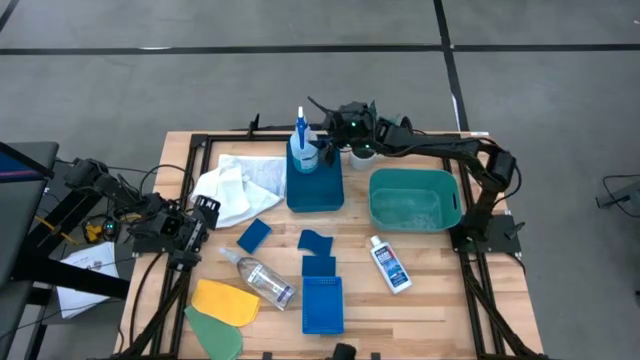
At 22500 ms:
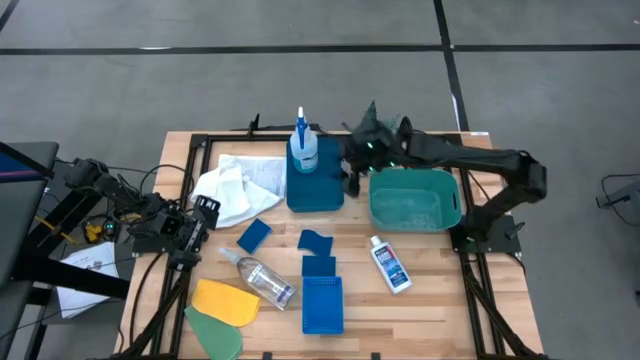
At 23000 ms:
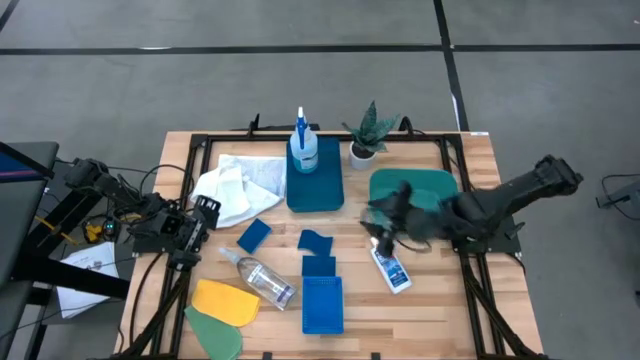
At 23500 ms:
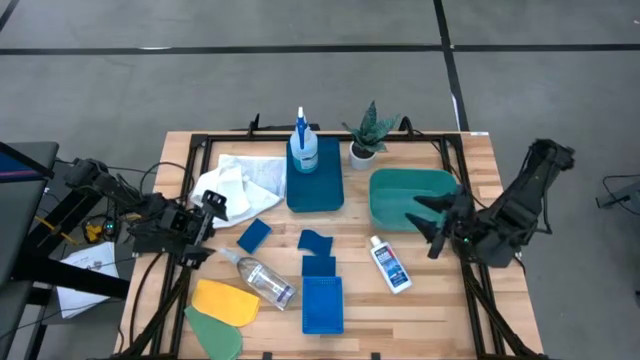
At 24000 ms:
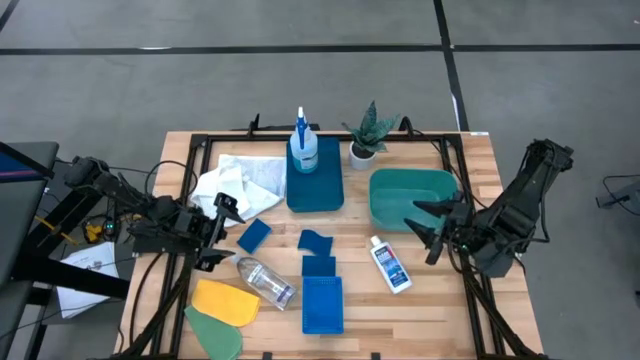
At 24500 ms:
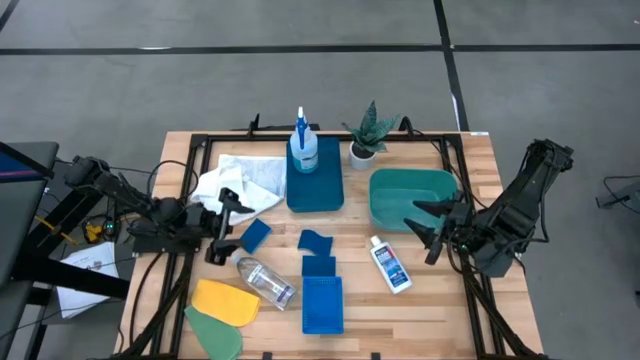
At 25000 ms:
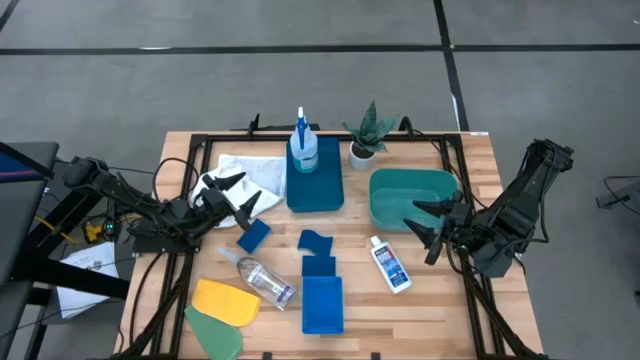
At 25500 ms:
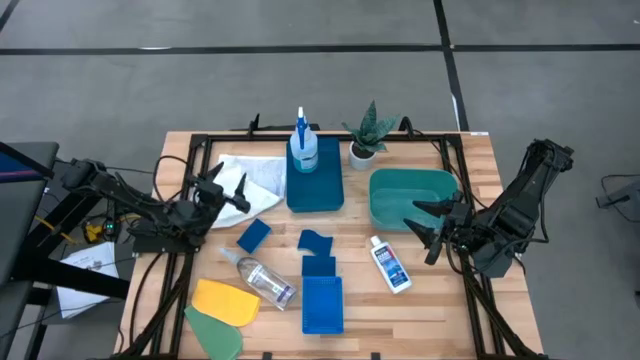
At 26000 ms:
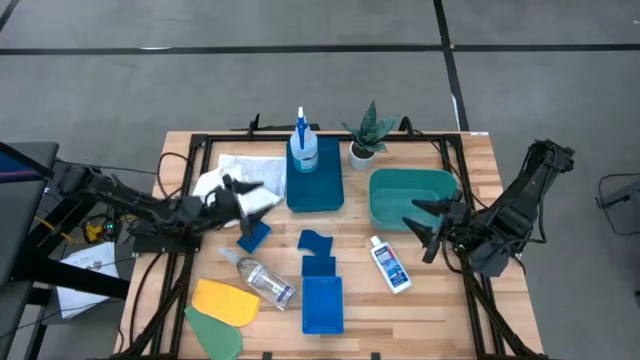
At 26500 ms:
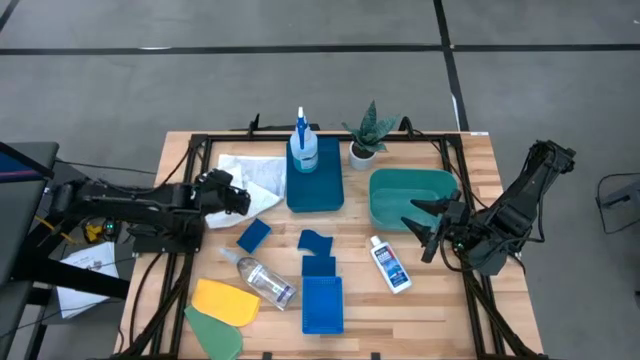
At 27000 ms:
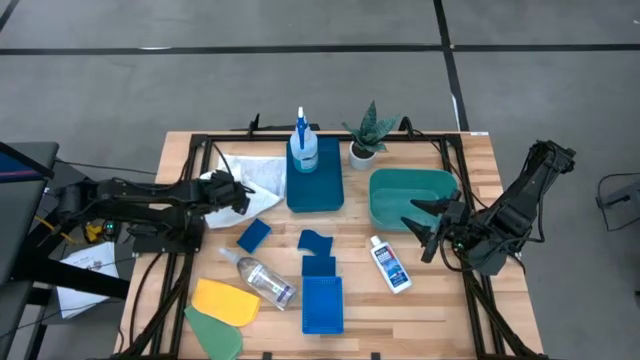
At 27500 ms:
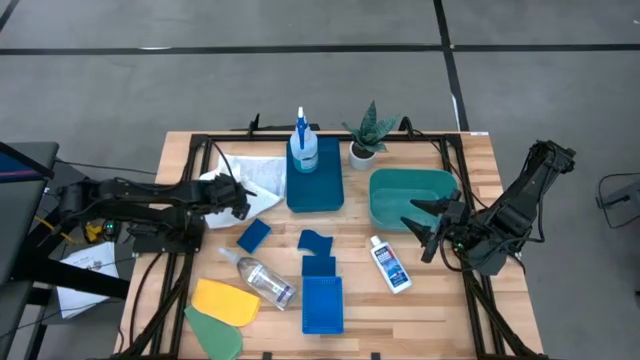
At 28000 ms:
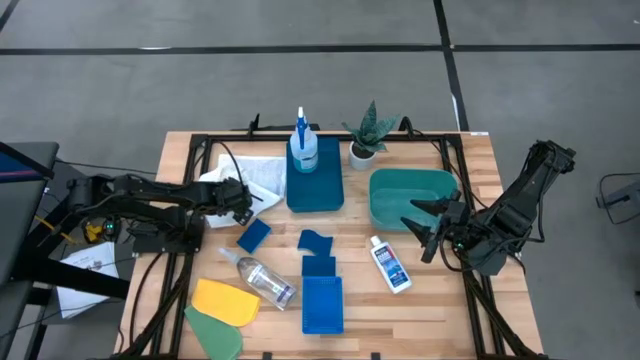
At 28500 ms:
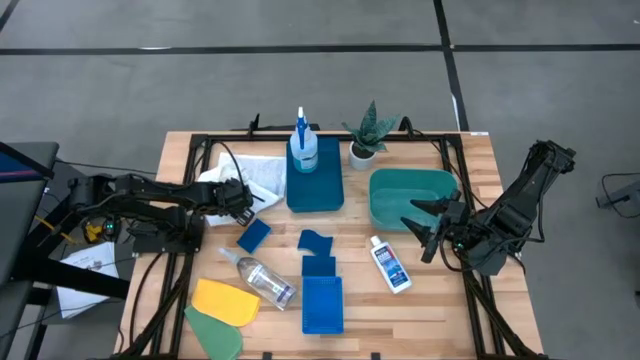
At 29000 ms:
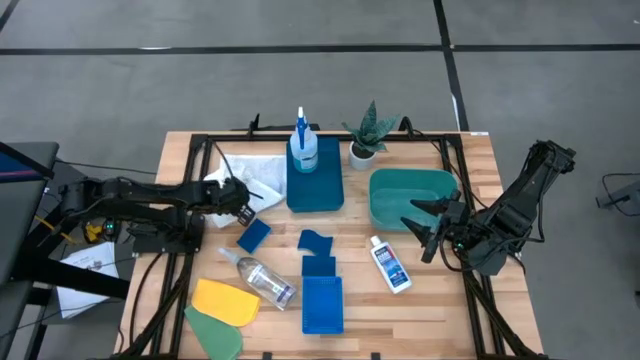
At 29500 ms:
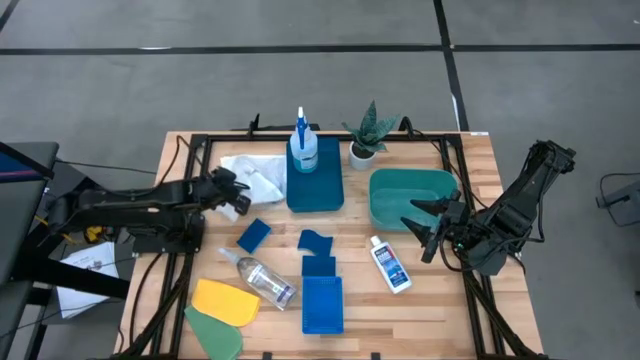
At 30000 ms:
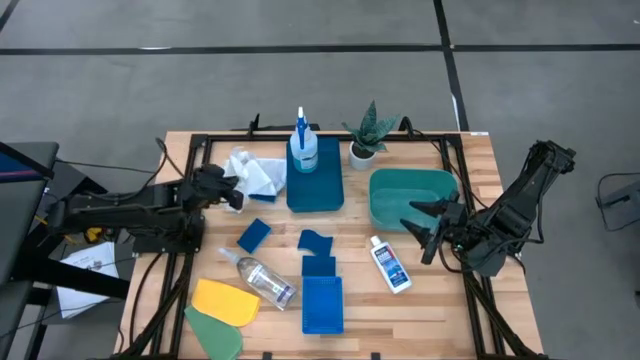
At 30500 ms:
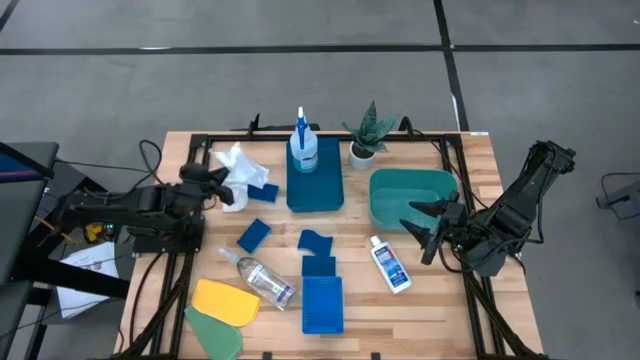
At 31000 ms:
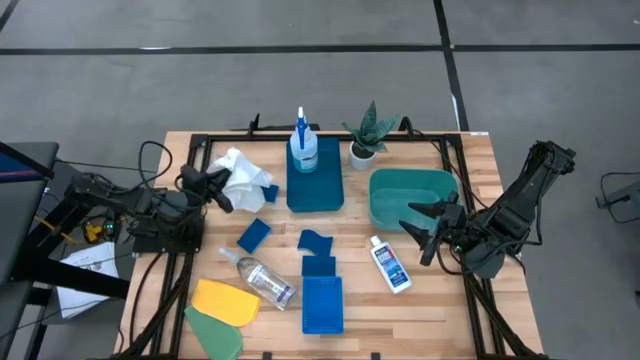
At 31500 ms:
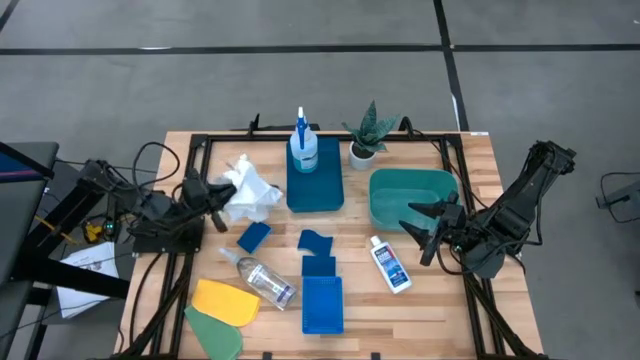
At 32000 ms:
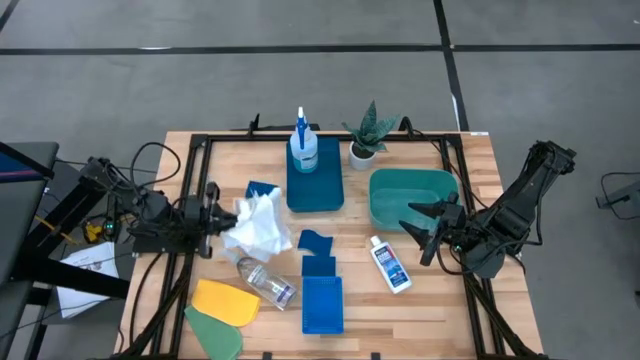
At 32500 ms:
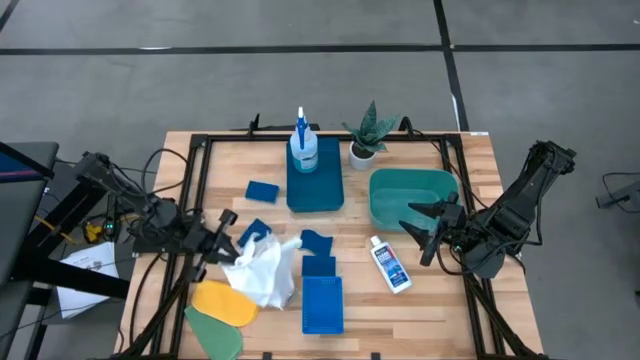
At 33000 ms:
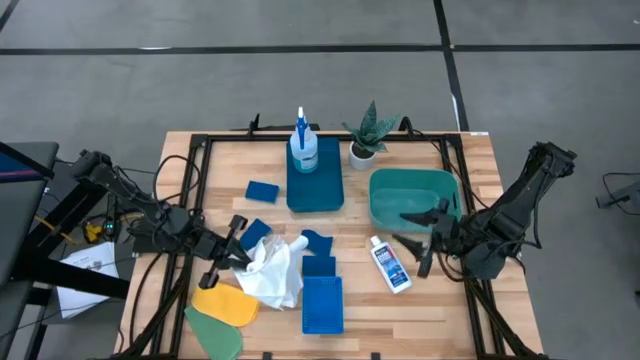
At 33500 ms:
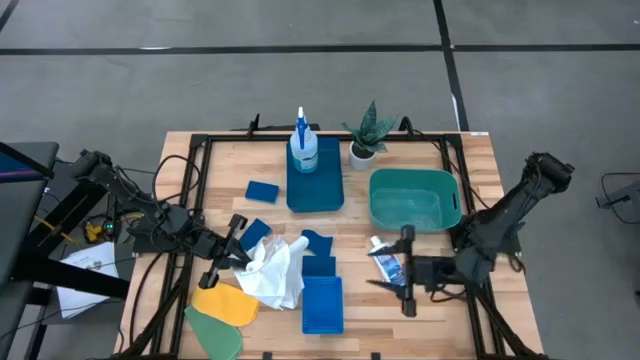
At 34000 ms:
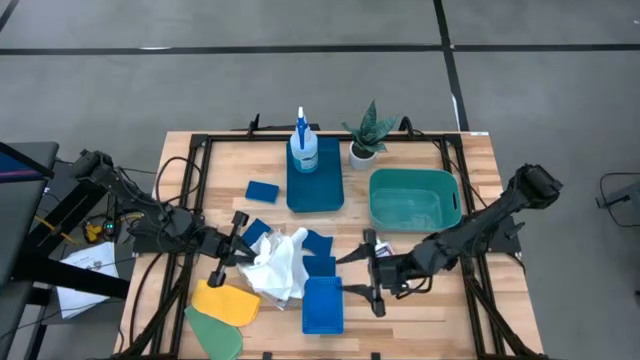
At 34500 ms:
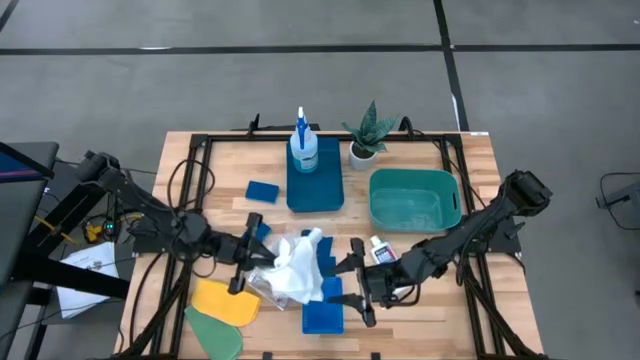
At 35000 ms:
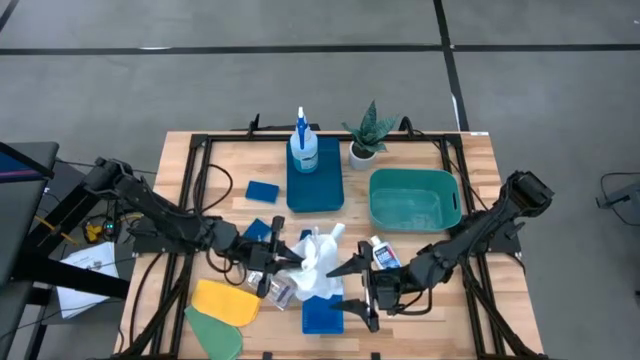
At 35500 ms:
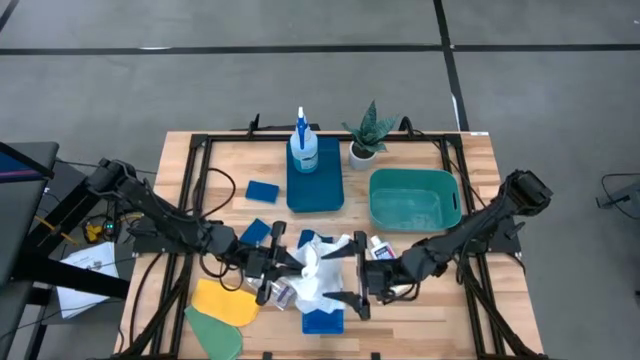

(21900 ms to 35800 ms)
Task: Pick & Place Kitchen Items
Put the white microfiber towel into the green bin

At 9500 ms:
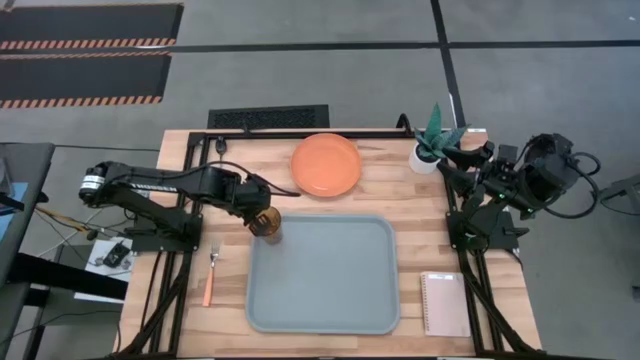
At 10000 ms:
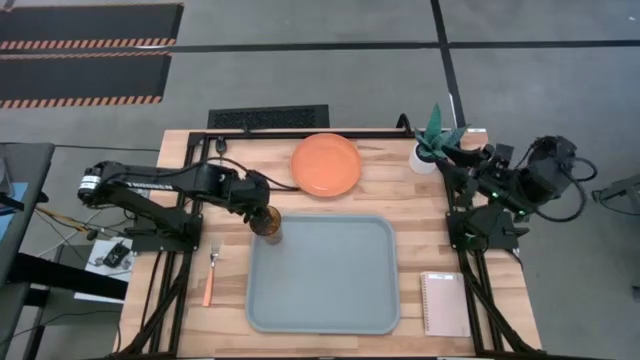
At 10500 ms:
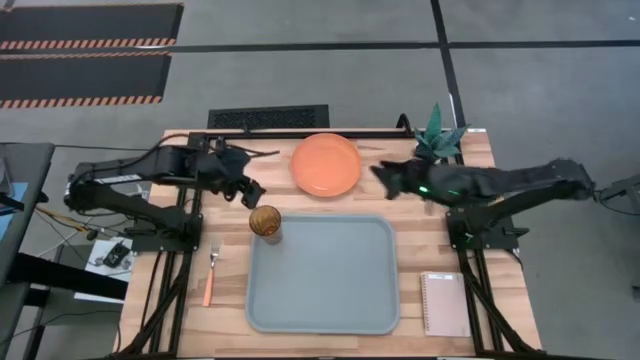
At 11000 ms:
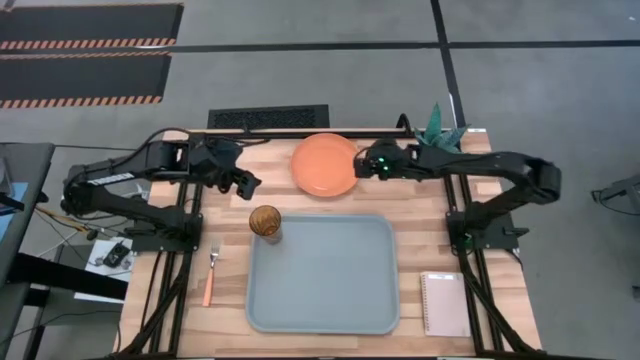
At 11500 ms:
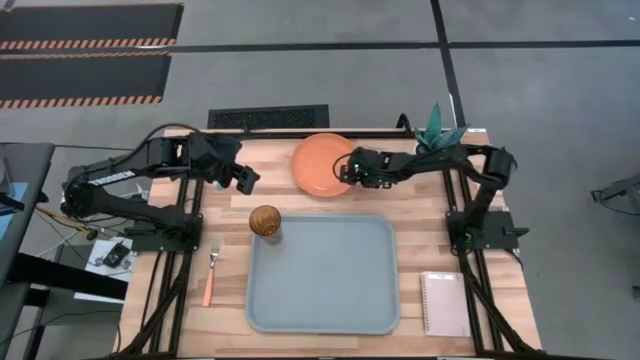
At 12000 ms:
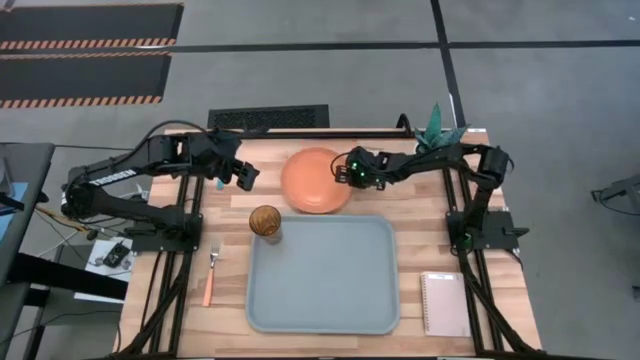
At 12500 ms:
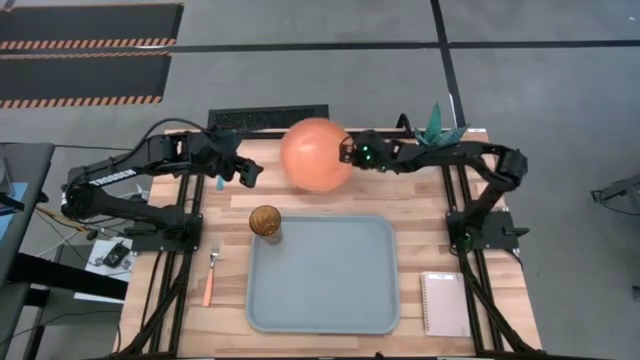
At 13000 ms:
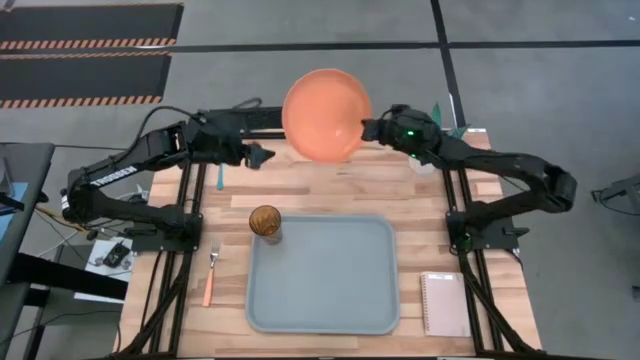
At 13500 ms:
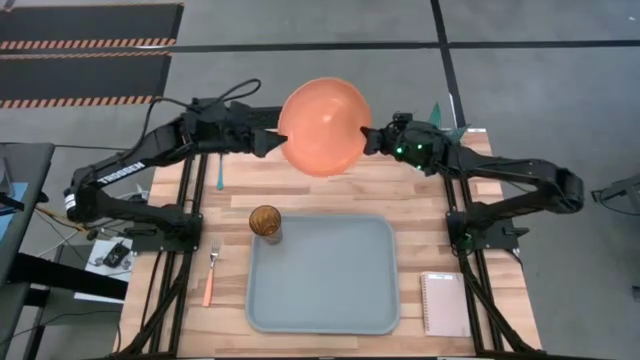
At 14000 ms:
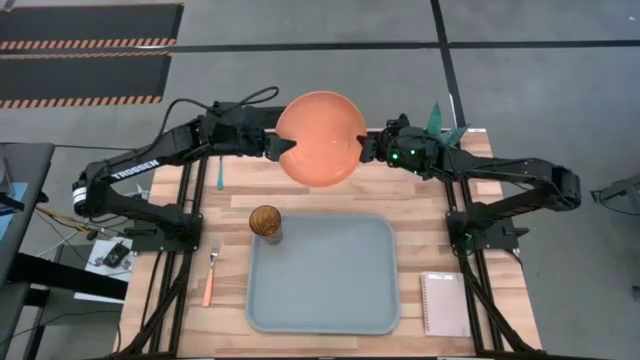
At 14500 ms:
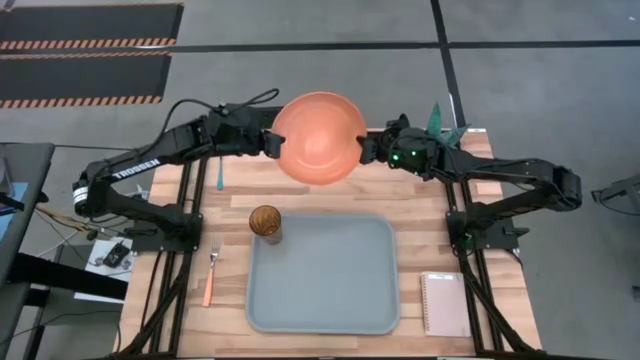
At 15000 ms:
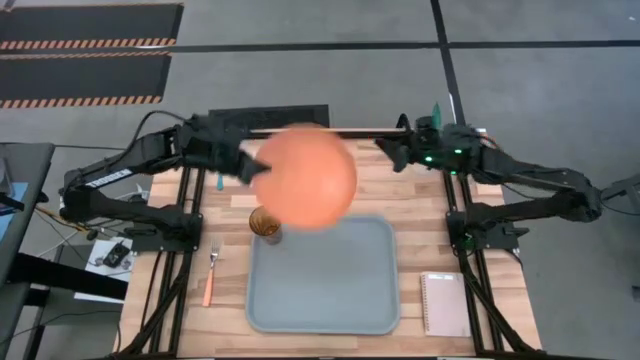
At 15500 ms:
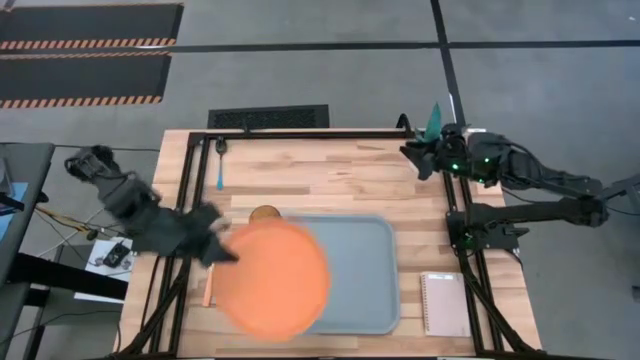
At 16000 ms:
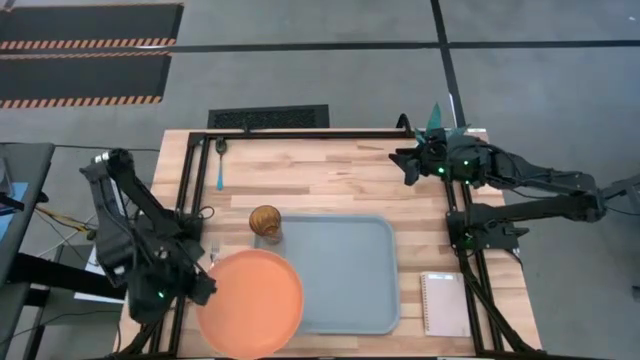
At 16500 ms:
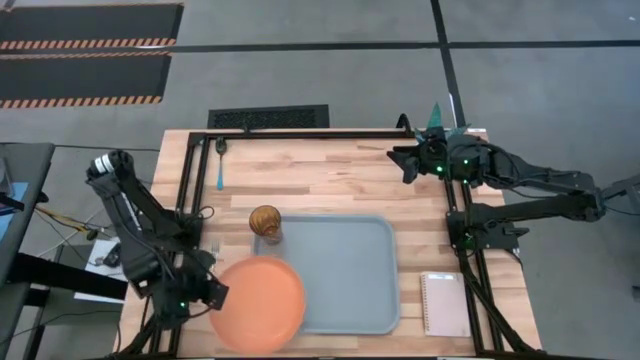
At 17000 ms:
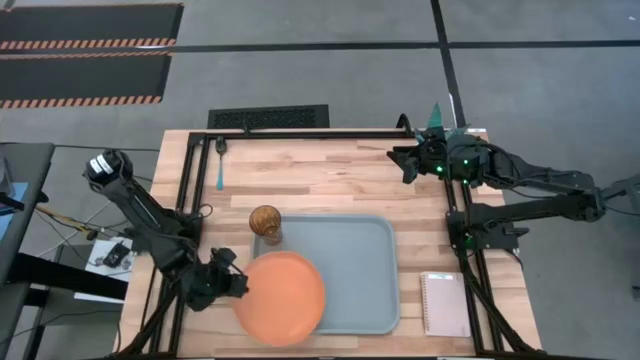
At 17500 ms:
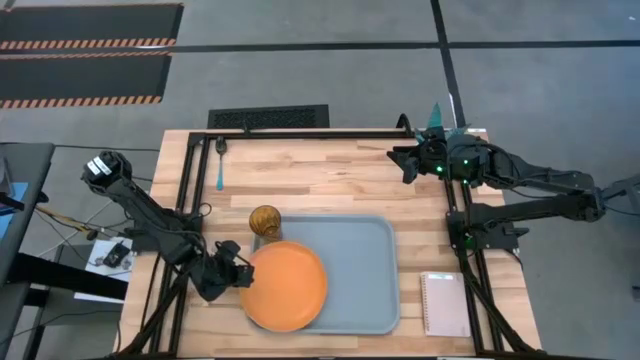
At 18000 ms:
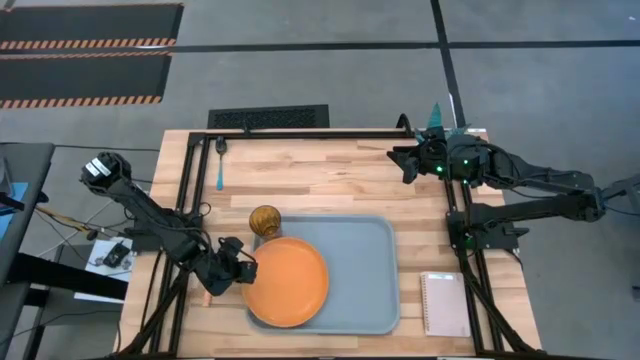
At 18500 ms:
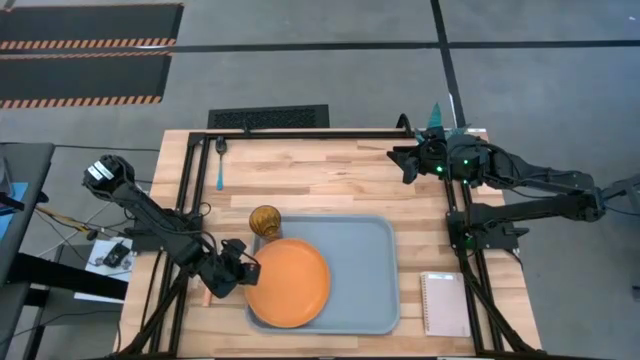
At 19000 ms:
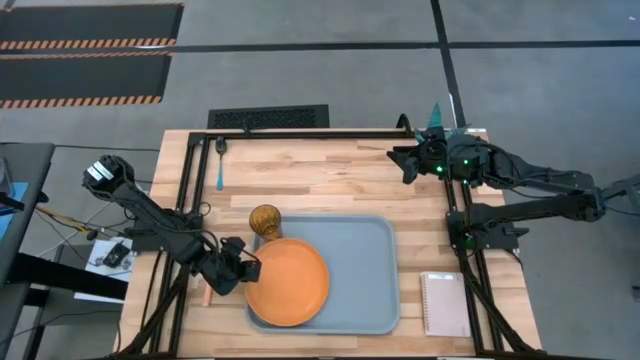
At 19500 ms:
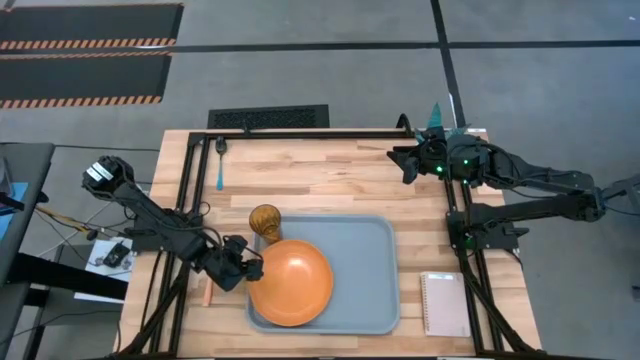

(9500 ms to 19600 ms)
Task: Pick and place plate/cup/fork/spoon on tray
Put the orange plate on the bottom left of the gray tray
